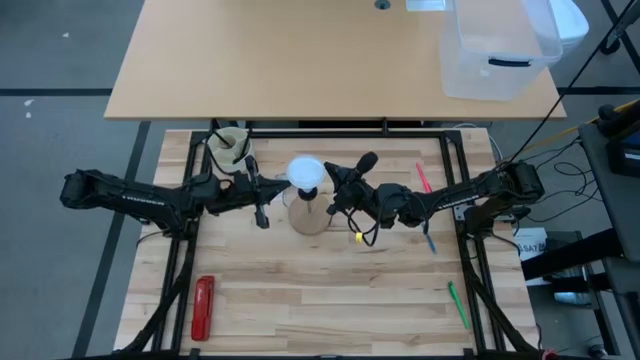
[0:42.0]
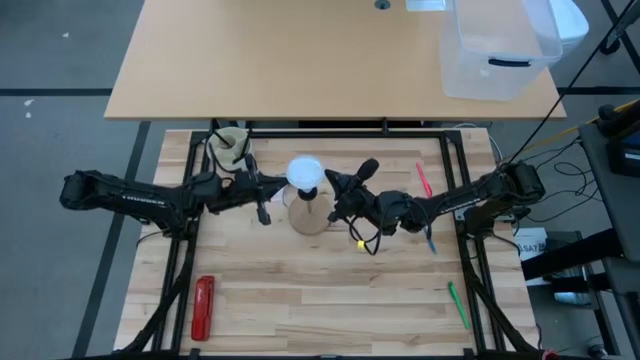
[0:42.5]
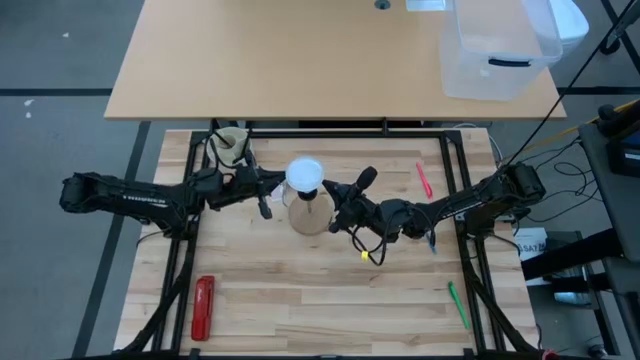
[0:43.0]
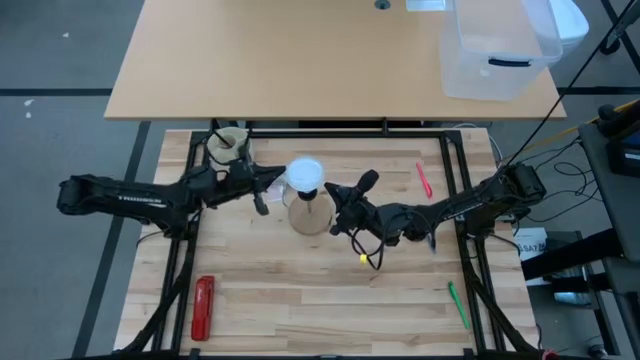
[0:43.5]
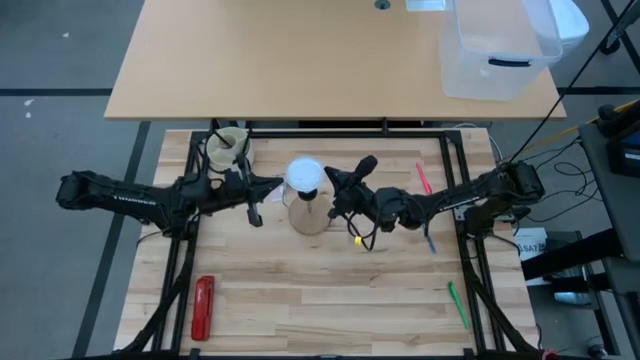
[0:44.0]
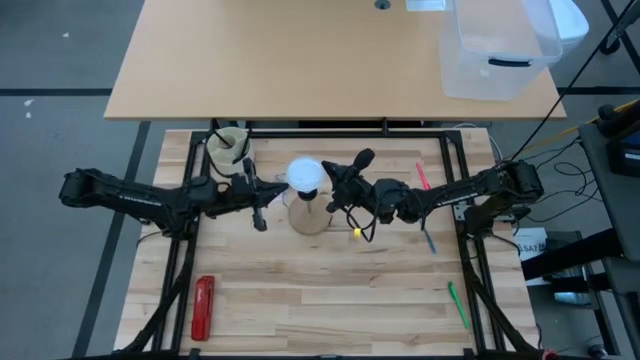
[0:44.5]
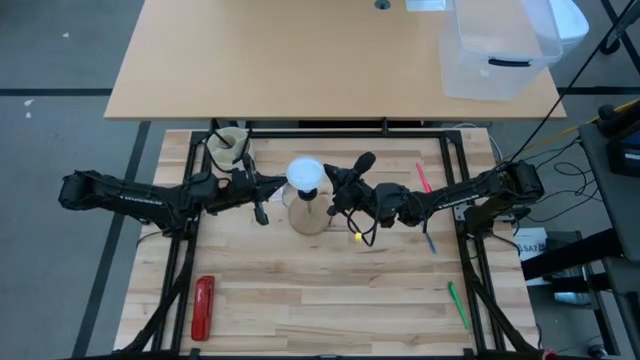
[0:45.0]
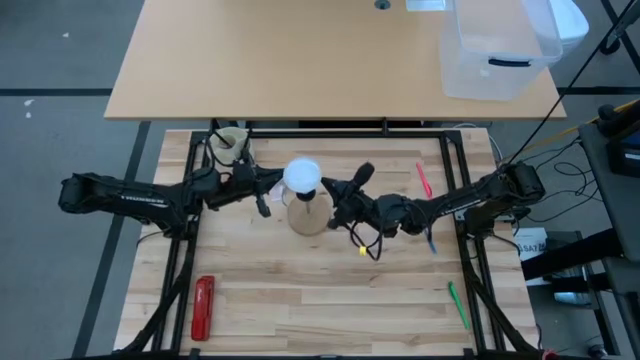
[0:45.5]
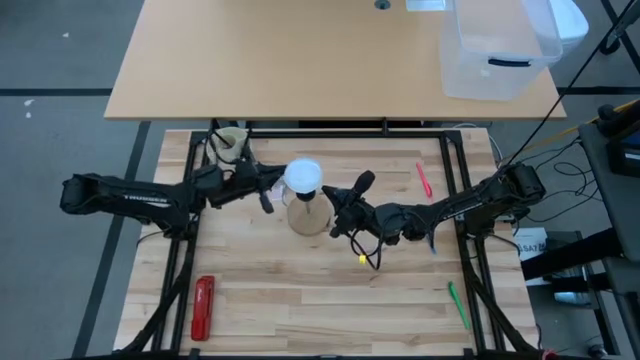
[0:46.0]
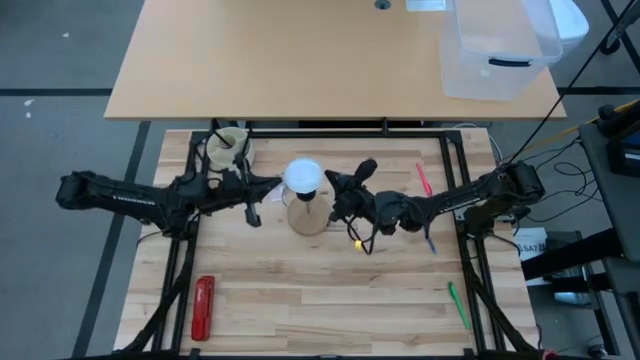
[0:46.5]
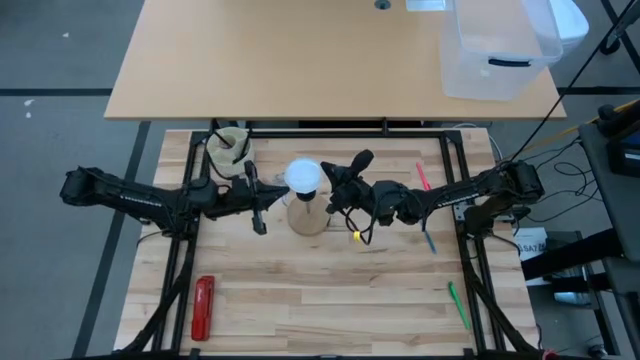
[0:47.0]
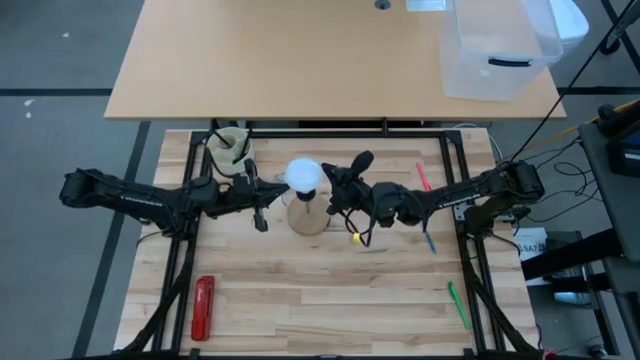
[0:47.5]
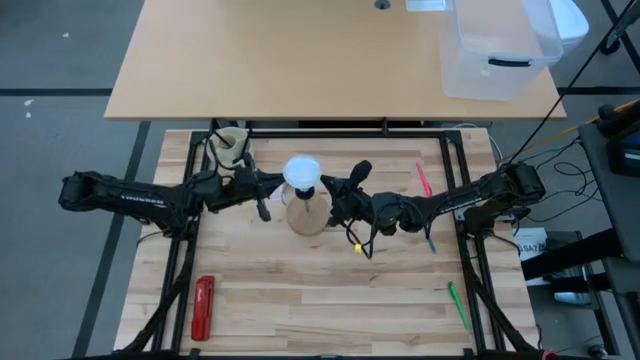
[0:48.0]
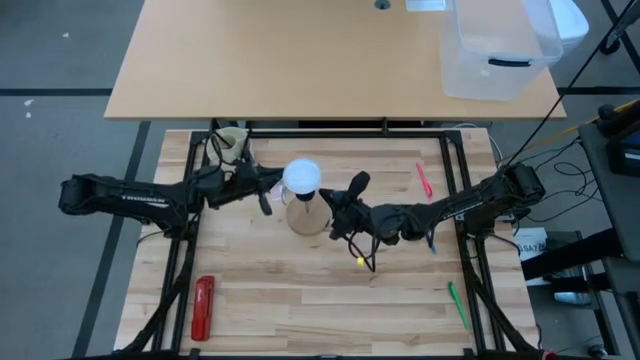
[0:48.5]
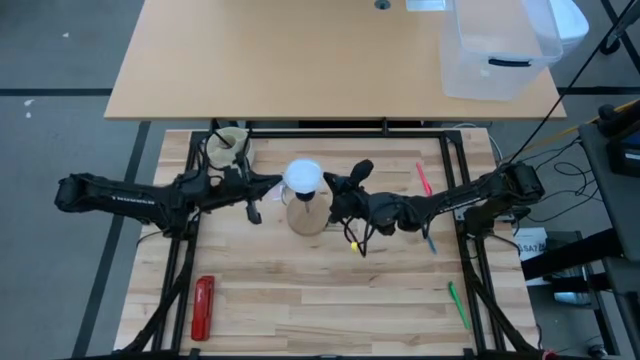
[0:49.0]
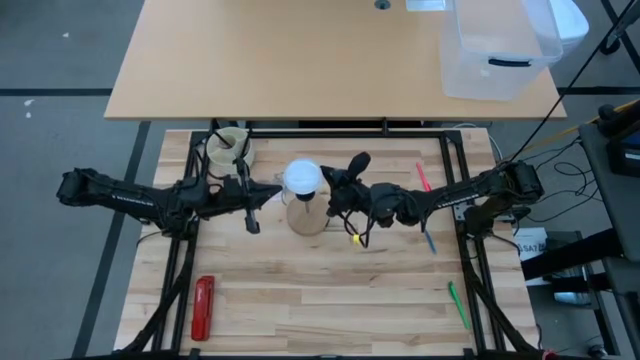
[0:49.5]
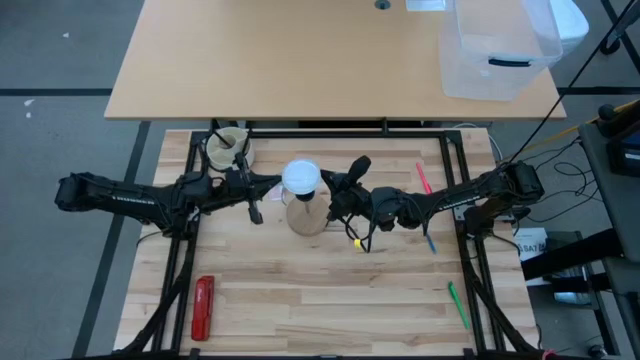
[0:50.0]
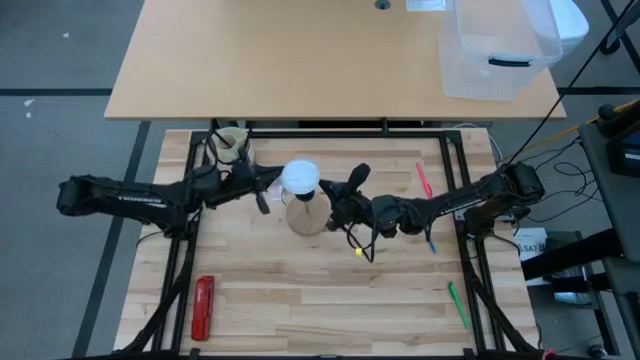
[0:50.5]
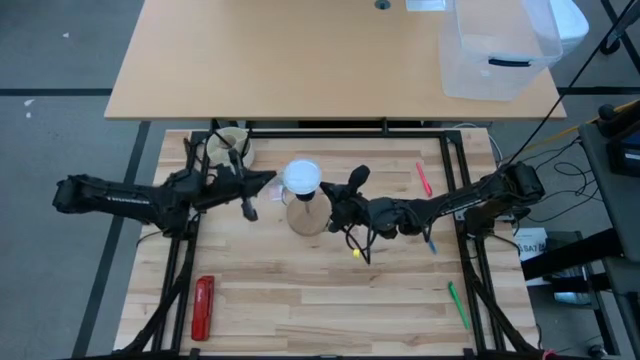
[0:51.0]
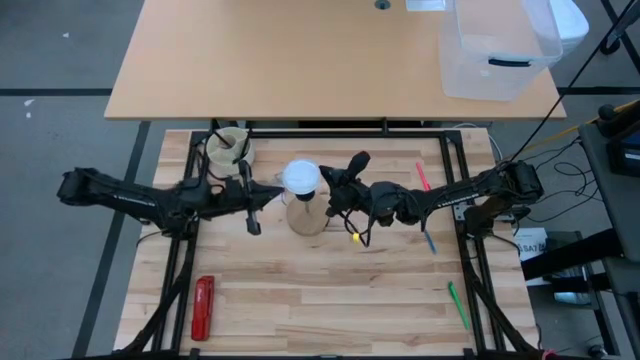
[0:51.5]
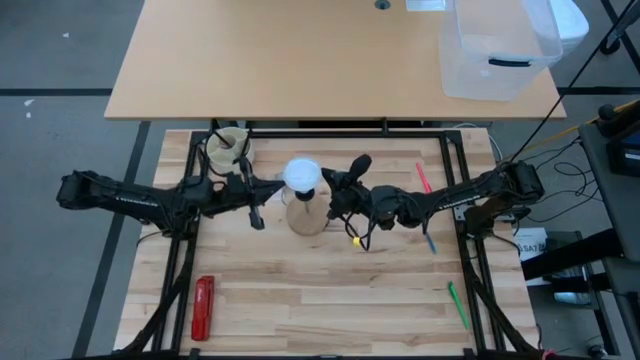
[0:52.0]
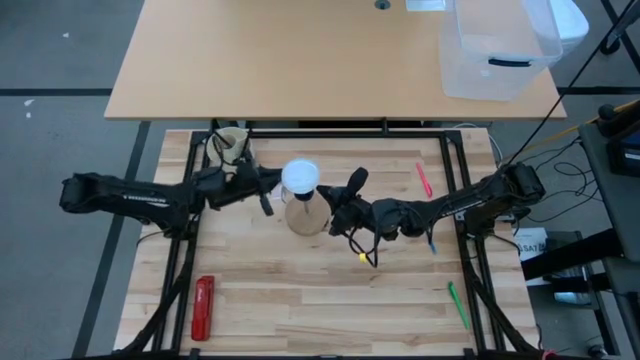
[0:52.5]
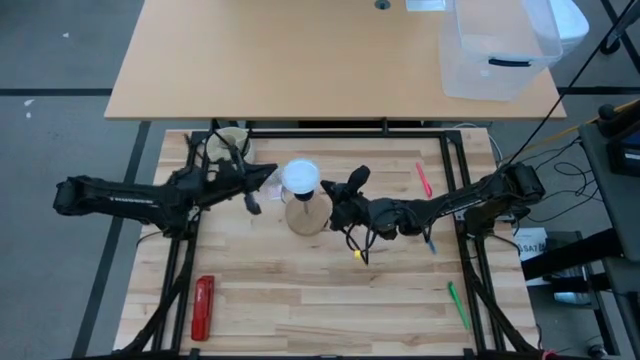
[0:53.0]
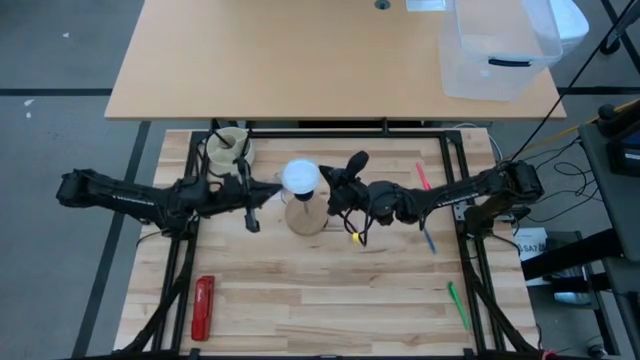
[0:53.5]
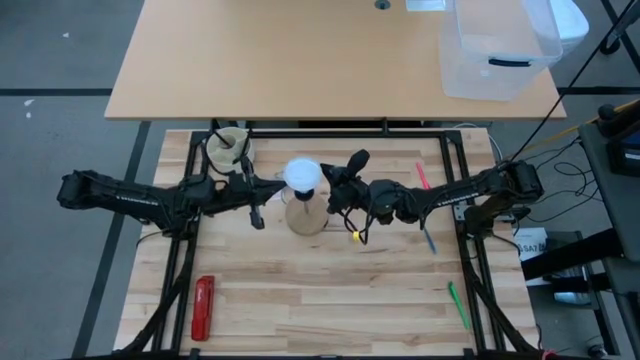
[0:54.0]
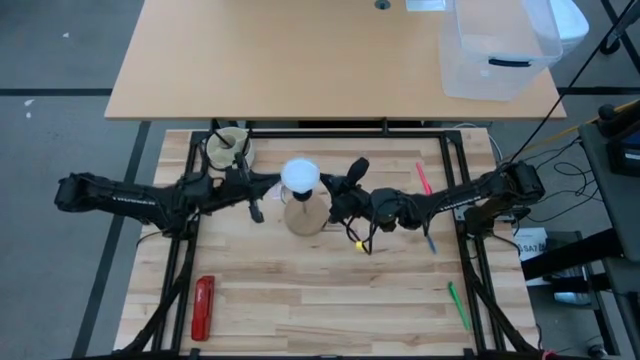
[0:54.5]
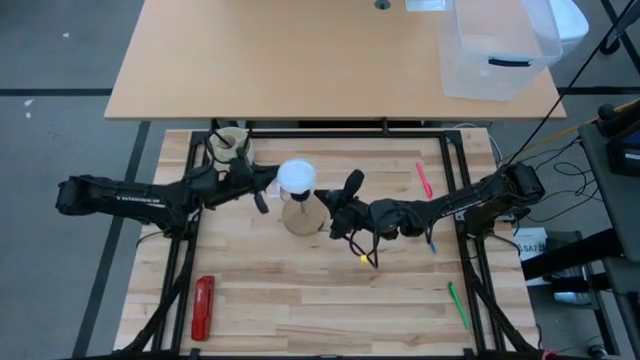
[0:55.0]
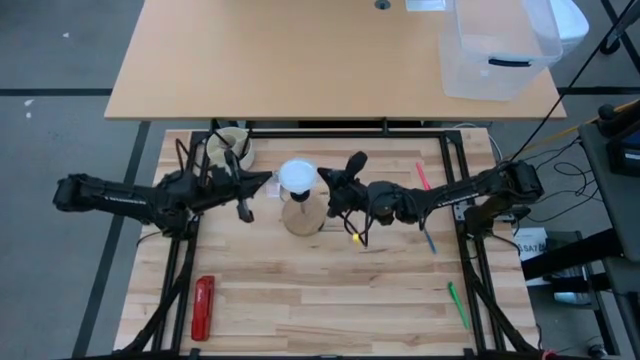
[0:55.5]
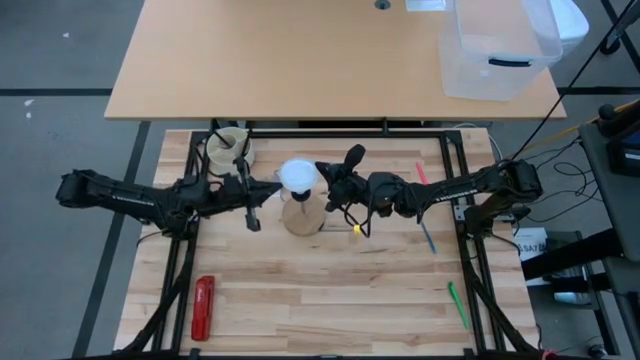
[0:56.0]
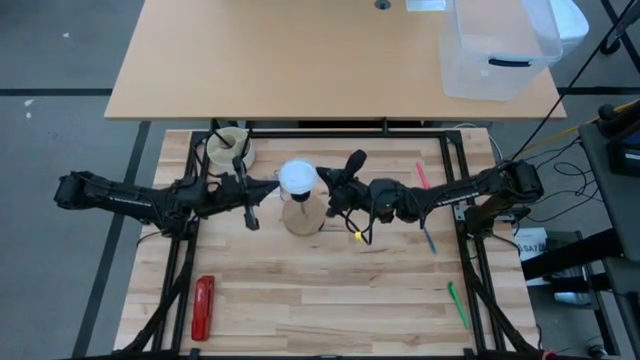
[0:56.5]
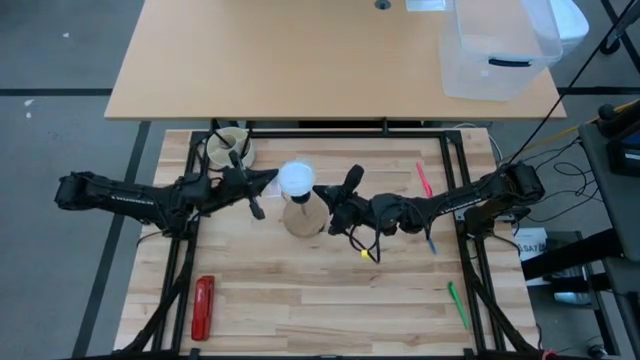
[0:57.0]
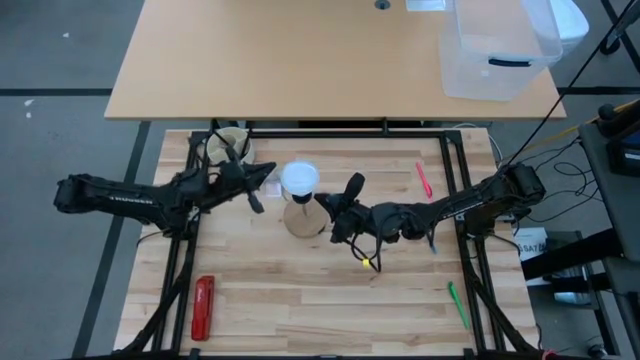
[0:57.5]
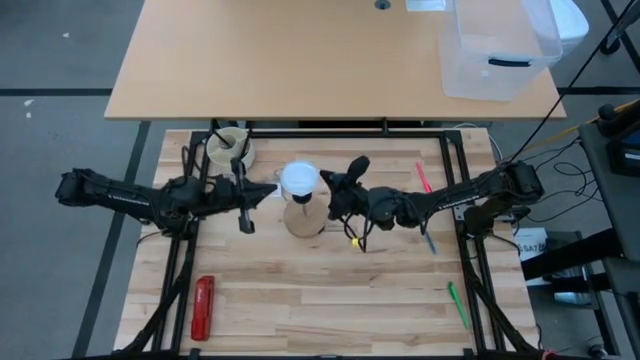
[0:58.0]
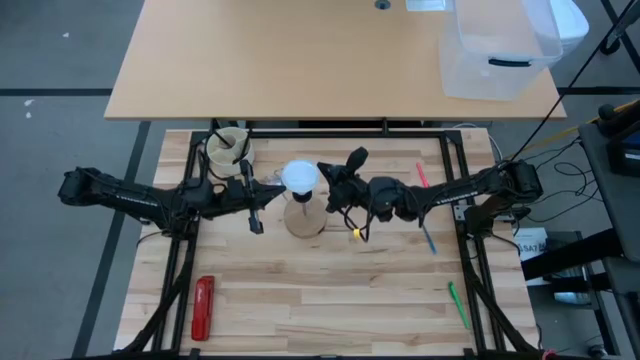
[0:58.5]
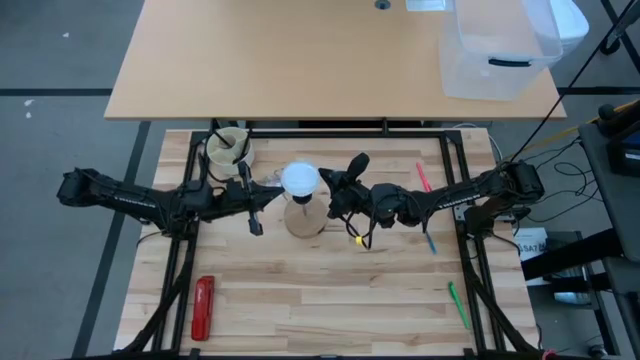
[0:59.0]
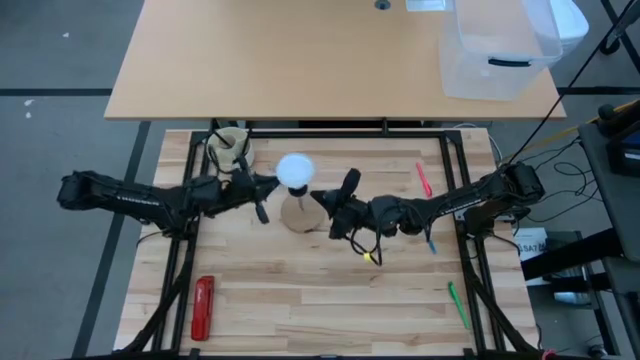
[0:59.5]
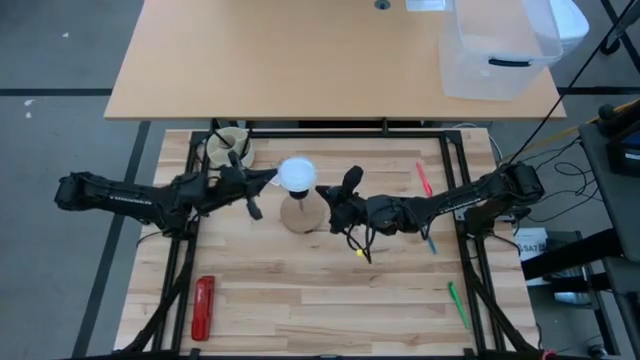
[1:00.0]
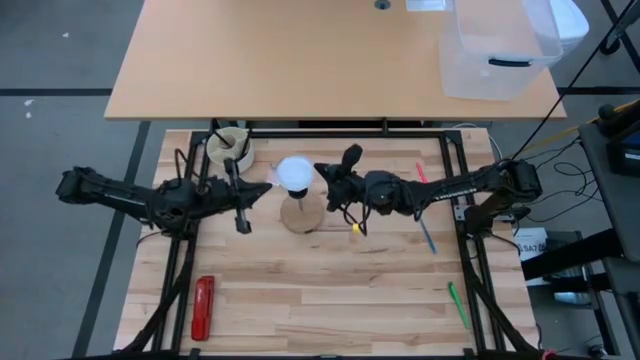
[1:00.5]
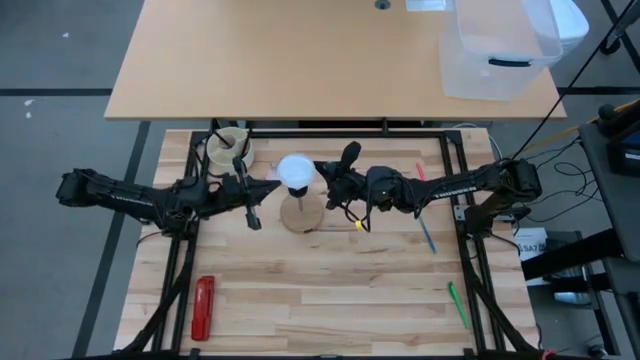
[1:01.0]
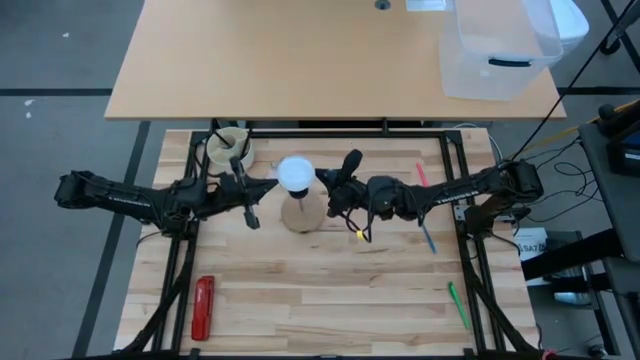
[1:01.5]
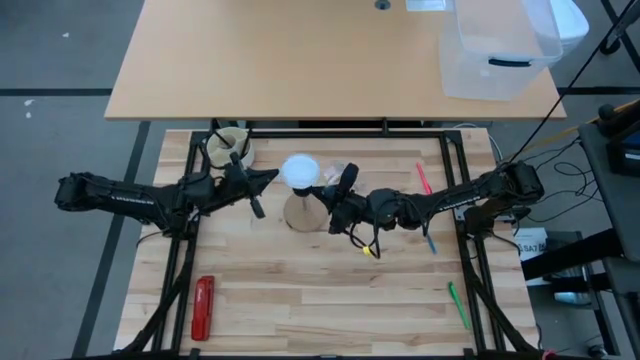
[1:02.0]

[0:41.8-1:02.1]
Task: Screw lightbulb
Insert the lightbulb into the desk lamp
